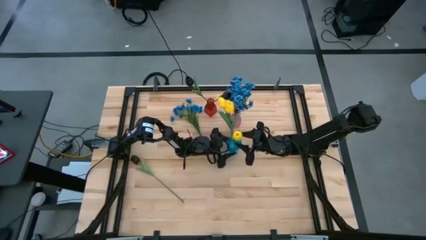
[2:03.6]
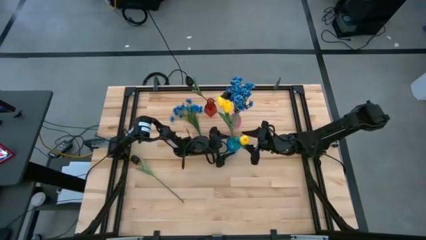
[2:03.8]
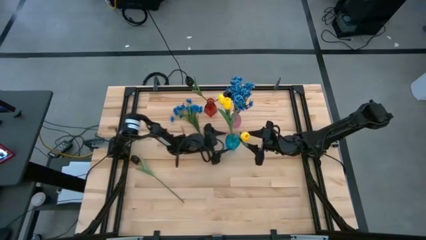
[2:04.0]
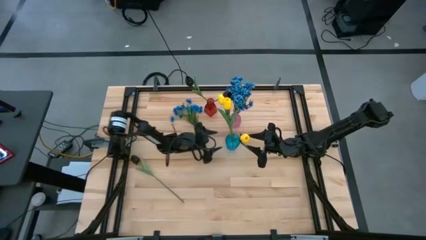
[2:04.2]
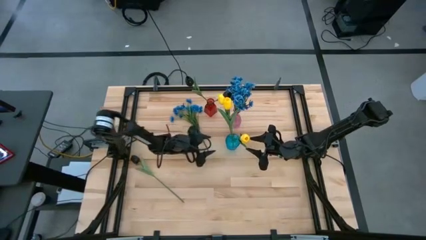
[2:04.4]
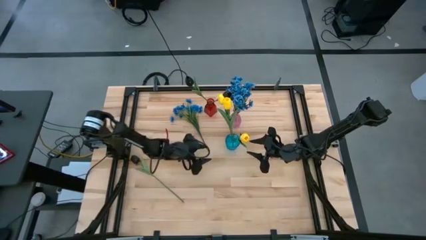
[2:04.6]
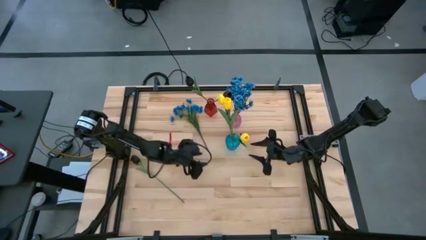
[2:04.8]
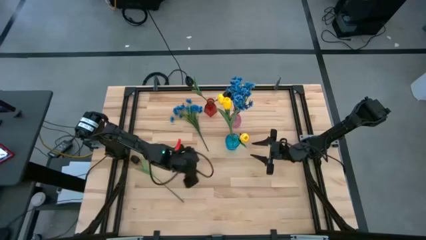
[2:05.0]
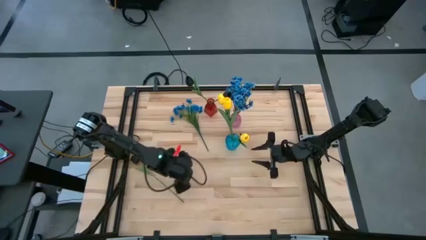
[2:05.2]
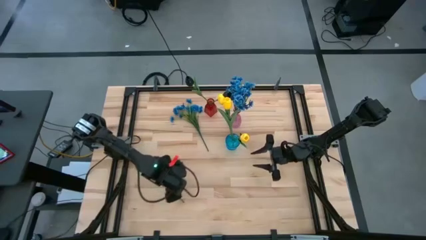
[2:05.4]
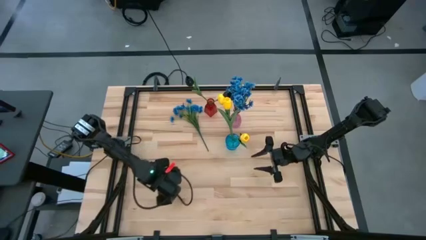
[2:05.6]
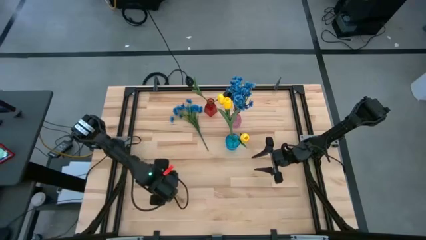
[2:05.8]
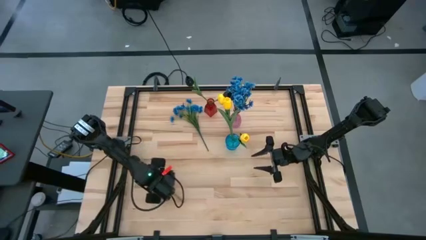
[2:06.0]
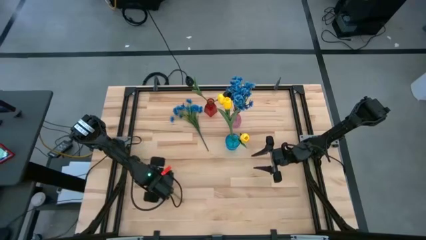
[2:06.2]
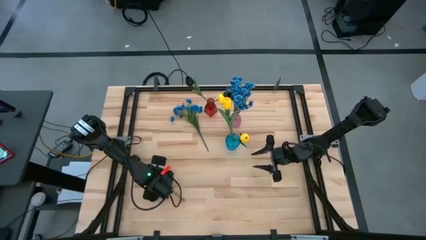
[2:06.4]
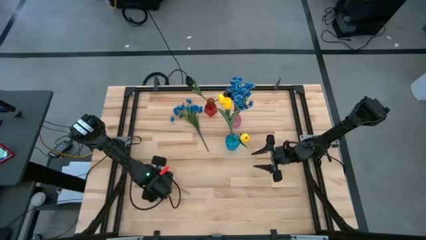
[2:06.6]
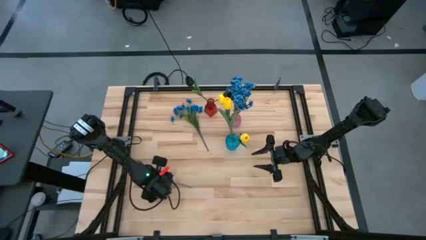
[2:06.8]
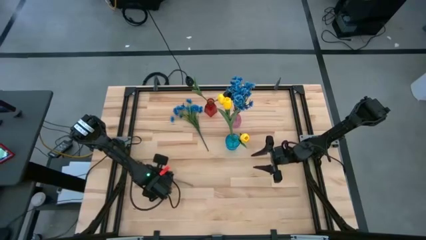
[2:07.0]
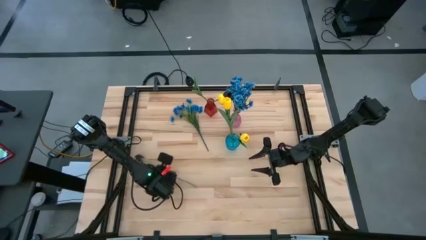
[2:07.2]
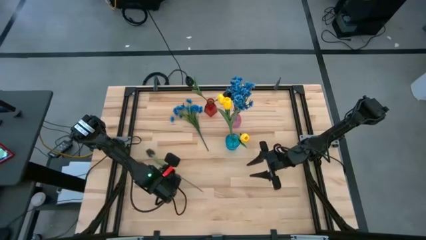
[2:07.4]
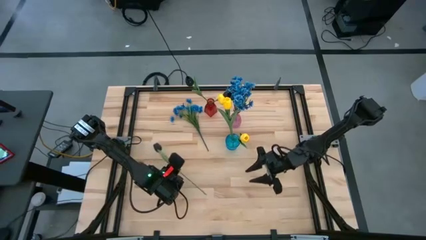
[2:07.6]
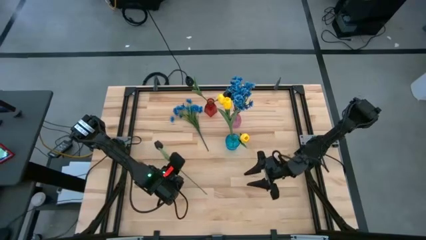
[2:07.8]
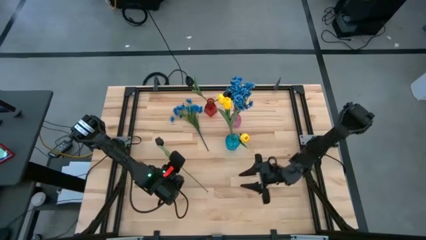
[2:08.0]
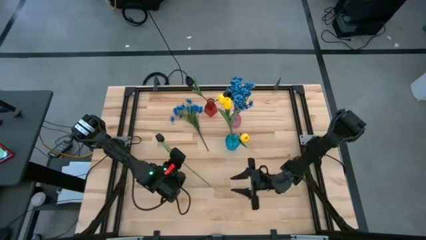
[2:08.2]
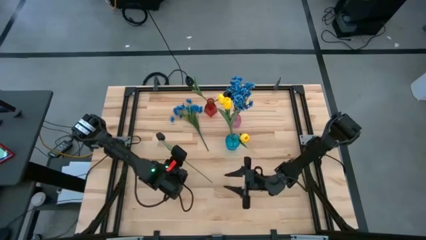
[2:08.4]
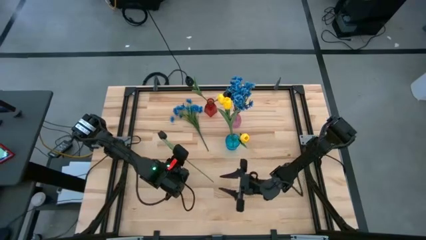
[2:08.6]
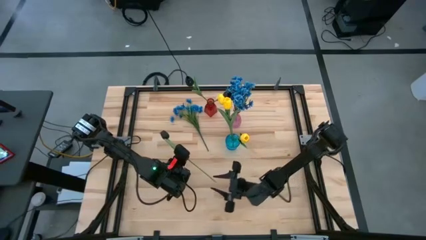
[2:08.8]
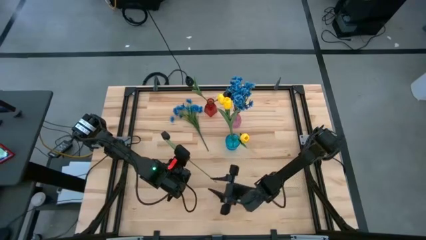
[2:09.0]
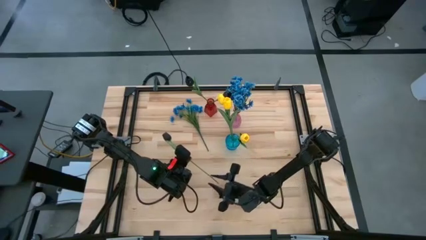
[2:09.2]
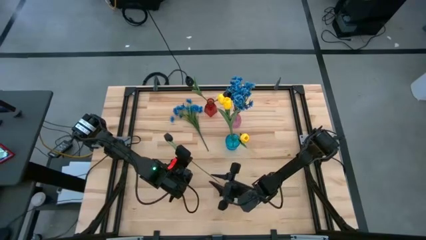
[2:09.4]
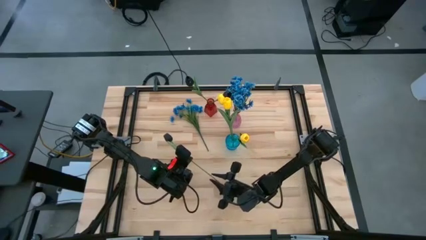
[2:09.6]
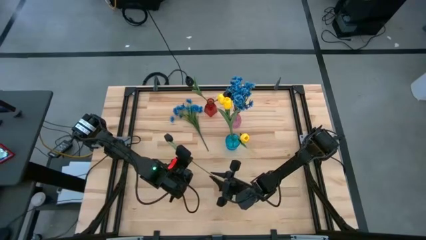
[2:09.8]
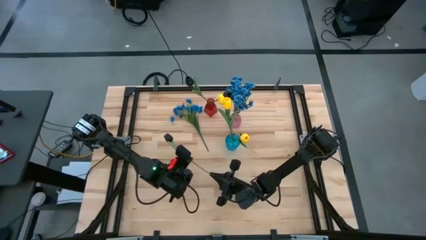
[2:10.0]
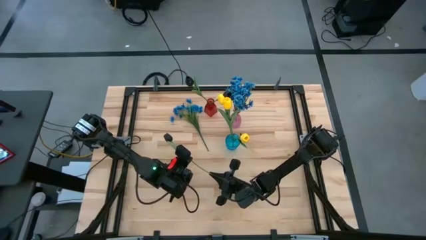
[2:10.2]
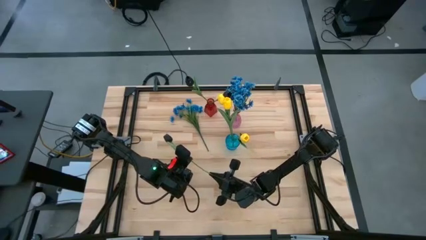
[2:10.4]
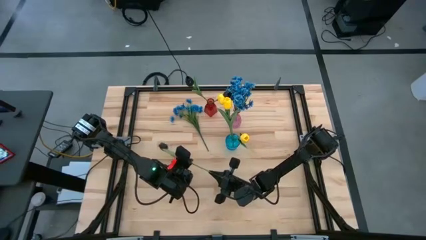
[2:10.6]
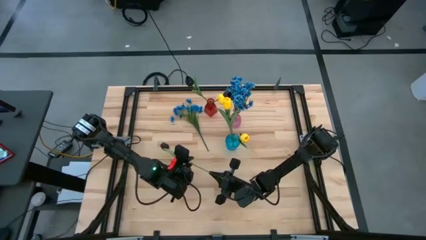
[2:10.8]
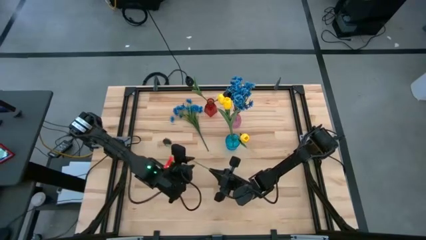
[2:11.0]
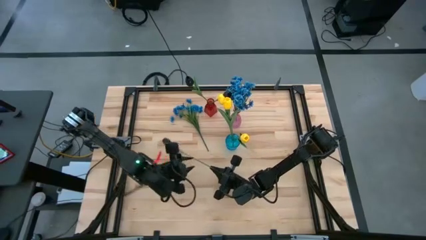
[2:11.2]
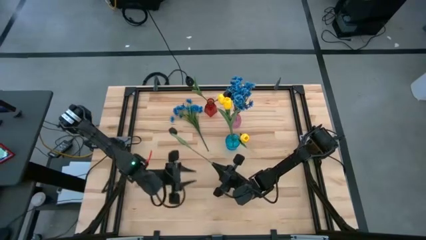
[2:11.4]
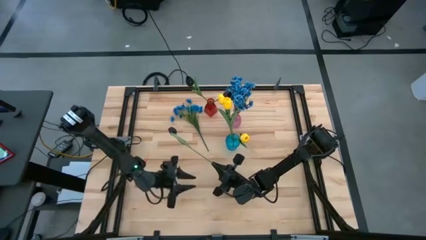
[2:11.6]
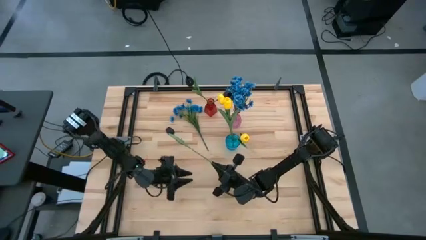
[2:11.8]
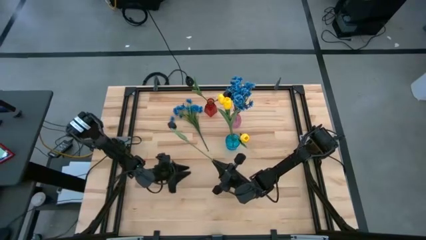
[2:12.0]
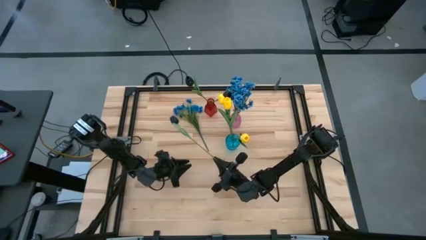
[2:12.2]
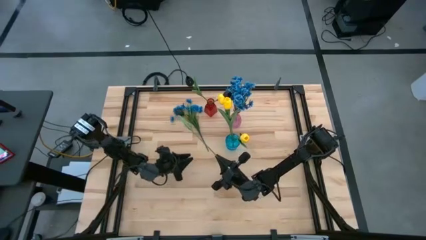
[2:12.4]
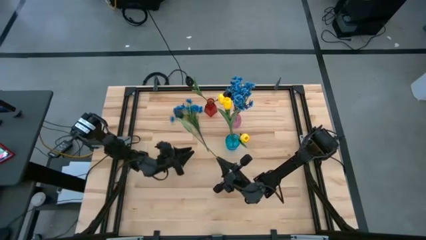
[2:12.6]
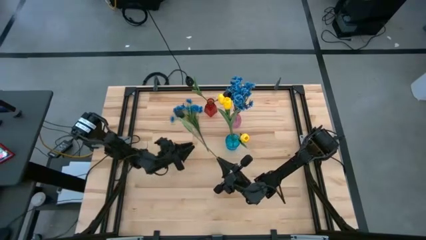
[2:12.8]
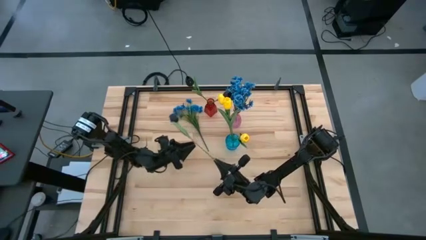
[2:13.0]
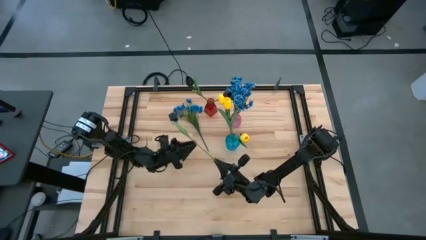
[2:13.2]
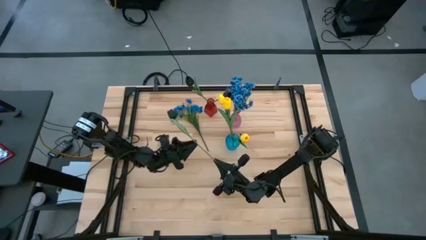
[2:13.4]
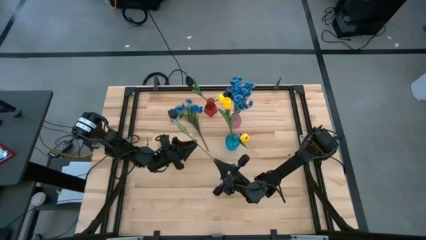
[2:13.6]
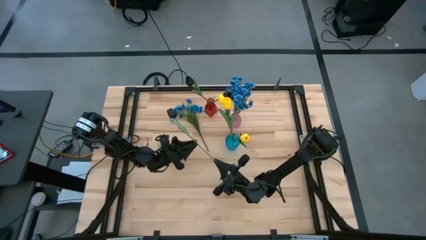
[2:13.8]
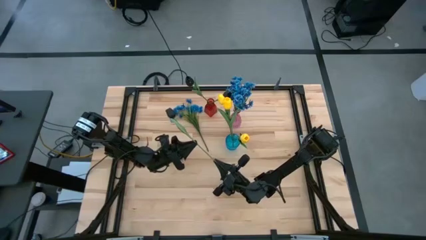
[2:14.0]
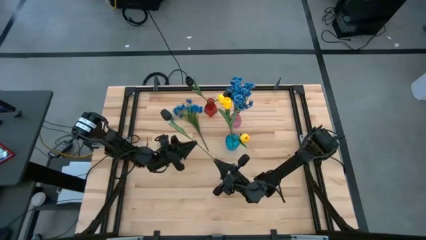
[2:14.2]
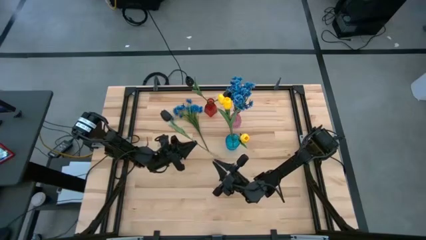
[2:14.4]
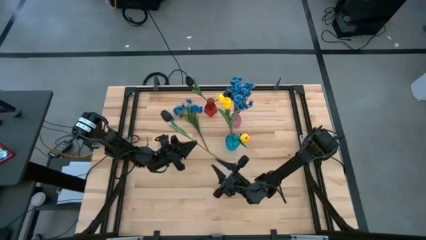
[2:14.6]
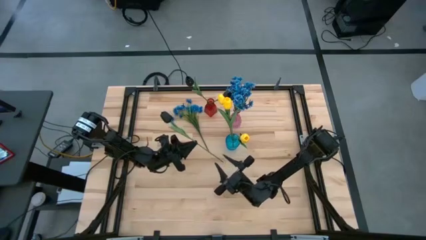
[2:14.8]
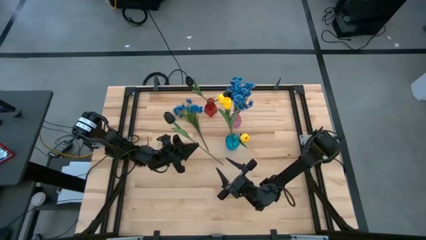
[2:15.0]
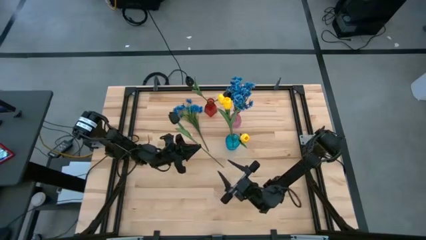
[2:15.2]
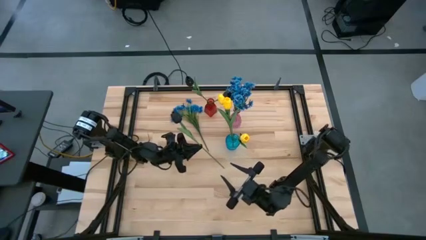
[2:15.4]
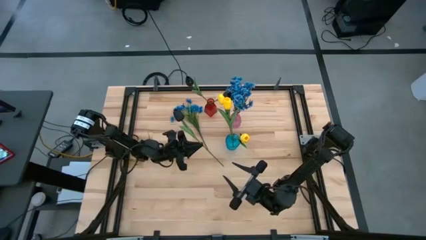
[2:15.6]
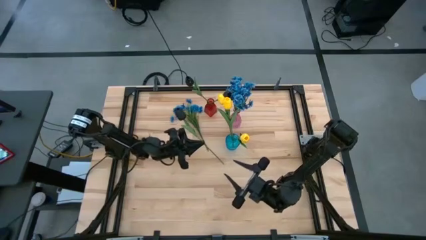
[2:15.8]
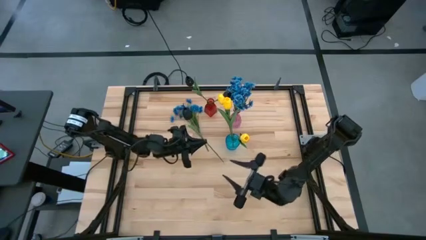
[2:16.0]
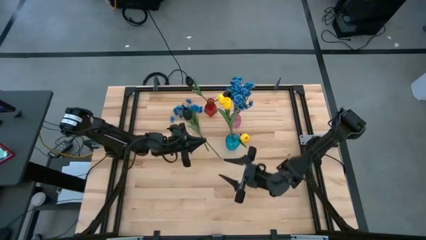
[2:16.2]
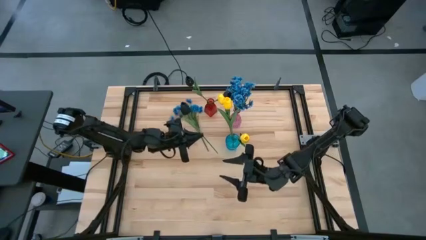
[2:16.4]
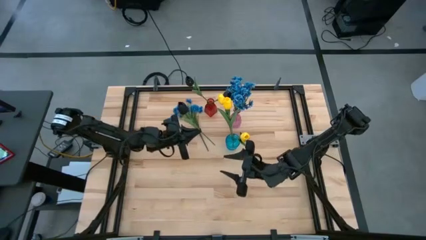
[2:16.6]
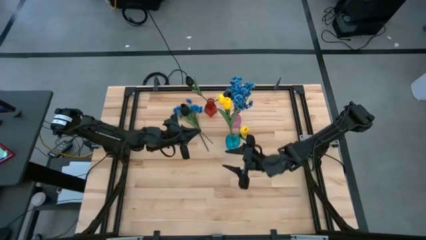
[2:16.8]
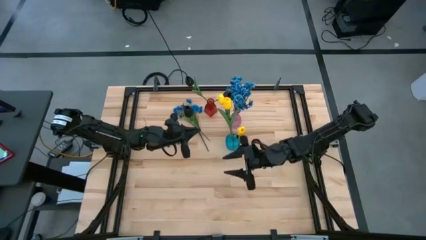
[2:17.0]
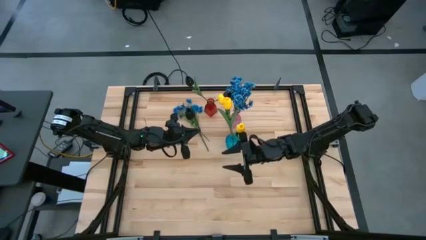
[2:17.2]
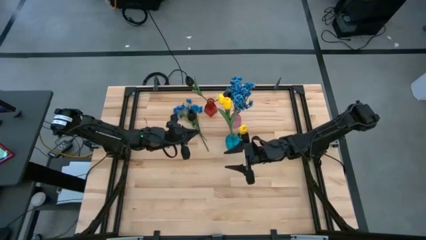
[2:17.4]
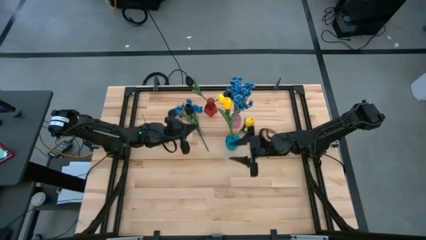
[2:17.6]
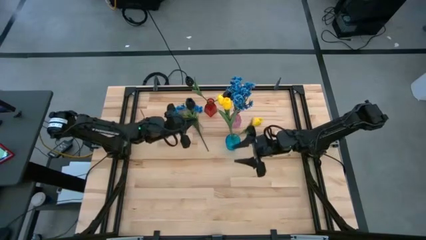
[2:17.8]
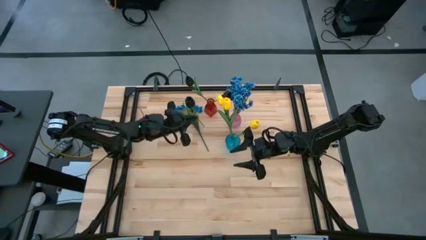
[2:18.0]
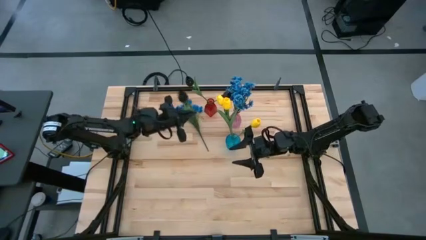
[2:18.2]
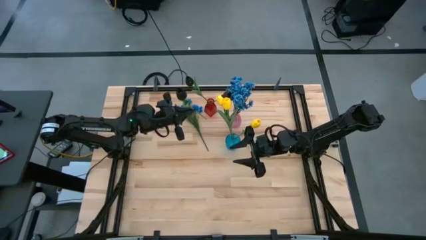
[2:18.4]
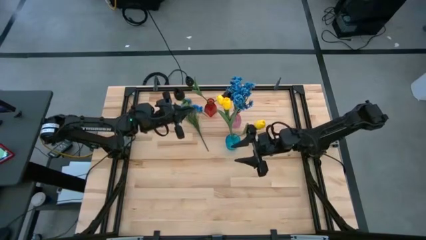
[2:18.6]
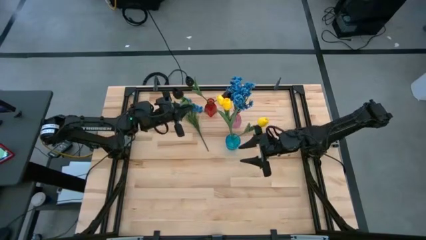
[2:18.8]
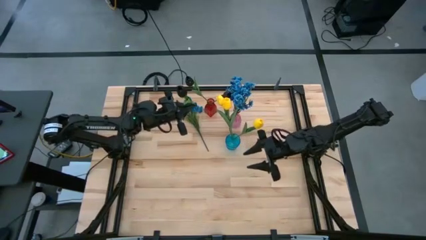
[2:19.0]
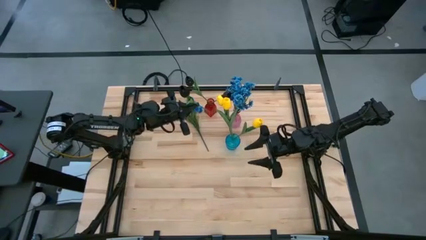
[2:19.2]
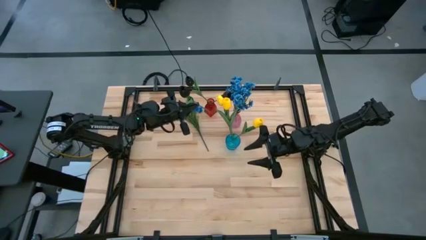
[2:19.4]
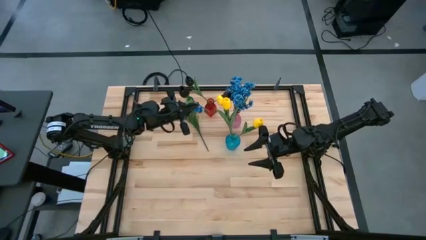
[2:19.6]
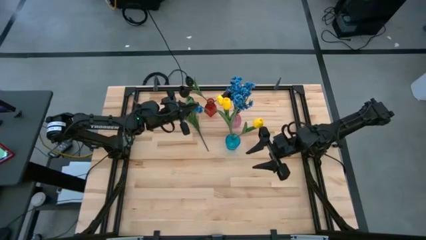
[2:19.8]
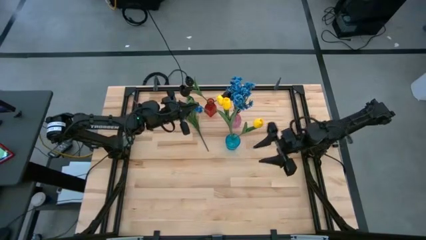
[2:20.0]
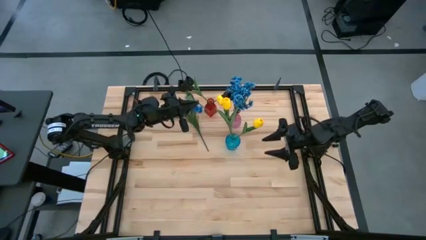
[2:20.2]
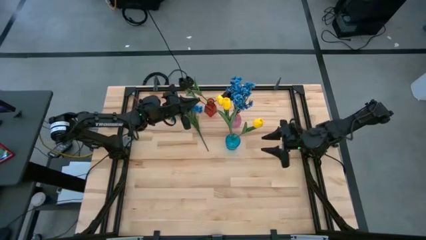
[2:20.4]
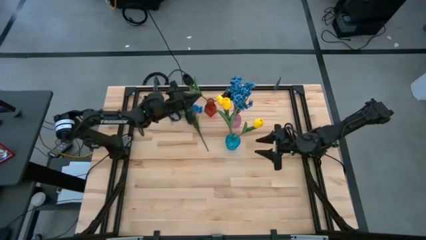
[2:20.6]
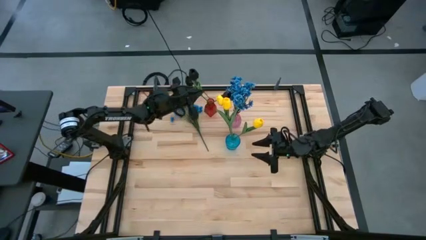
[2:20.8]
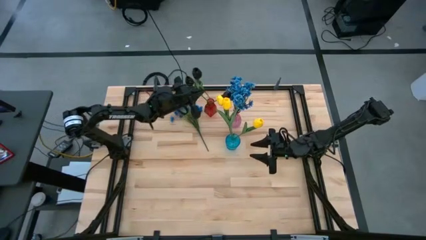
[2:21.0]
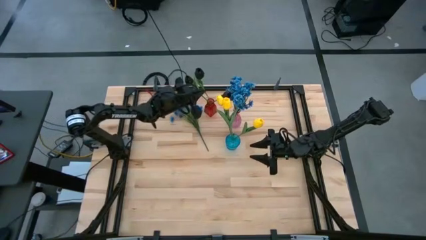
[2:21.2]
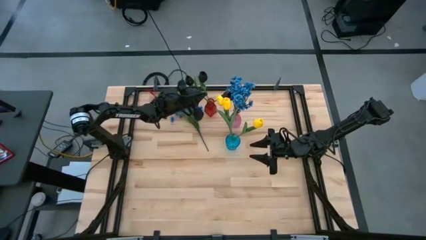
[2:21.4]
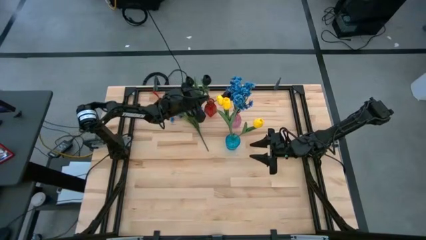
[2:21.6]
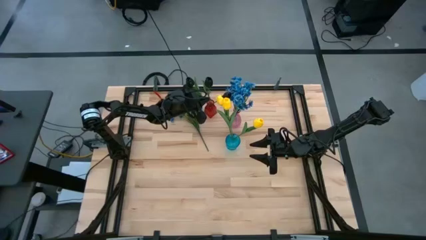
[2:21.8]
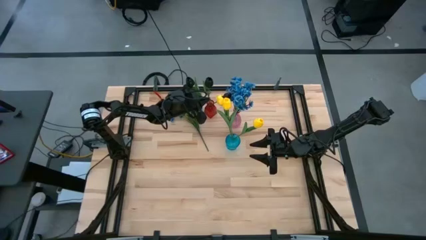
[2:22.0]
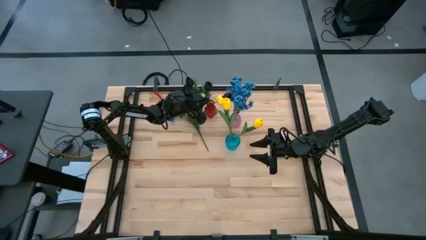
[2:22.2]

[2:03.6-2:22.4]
Task: Sort flowers into vase by color
Put the black flower into the red vase
